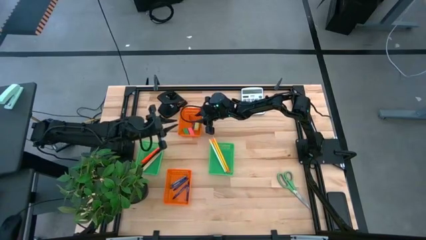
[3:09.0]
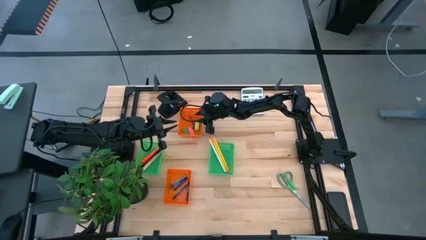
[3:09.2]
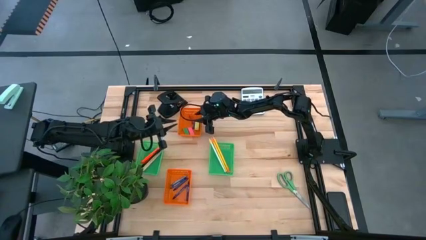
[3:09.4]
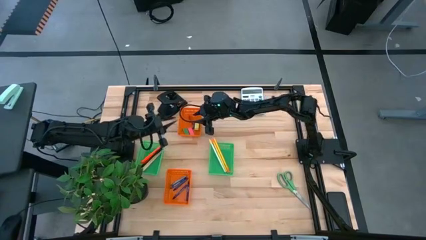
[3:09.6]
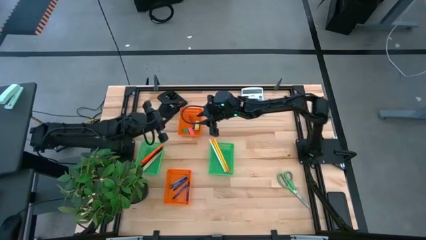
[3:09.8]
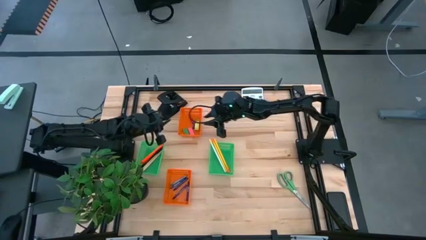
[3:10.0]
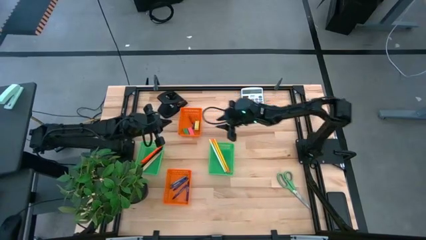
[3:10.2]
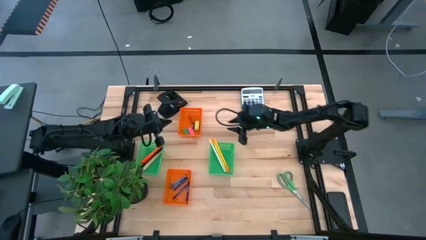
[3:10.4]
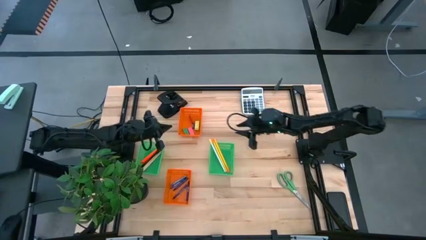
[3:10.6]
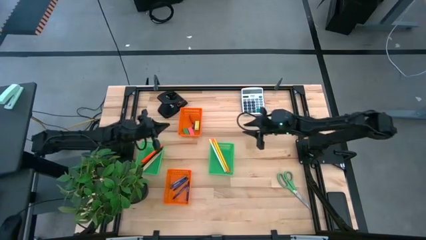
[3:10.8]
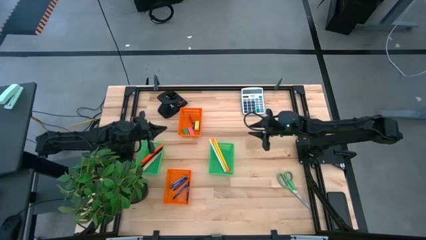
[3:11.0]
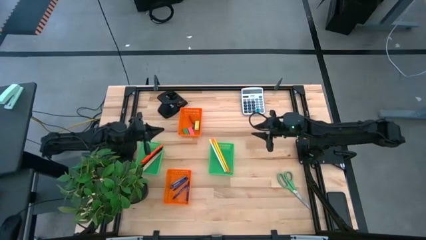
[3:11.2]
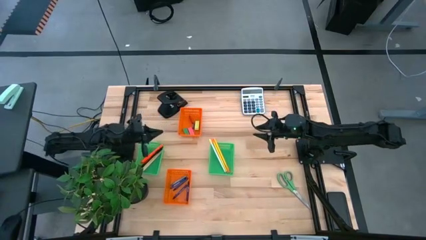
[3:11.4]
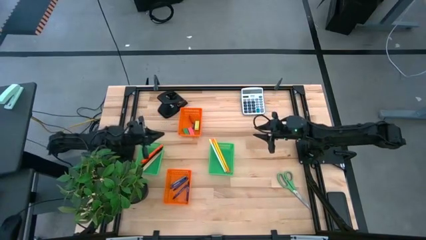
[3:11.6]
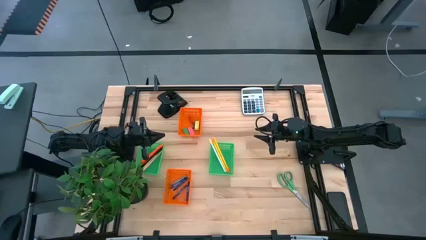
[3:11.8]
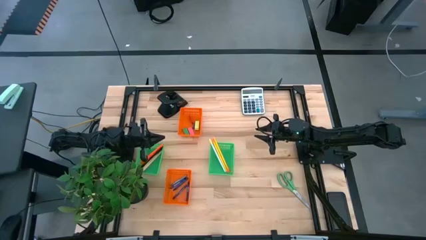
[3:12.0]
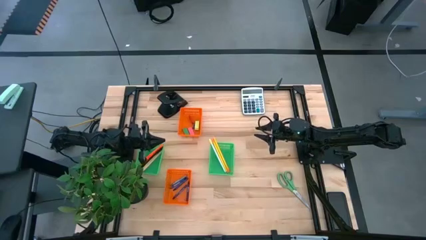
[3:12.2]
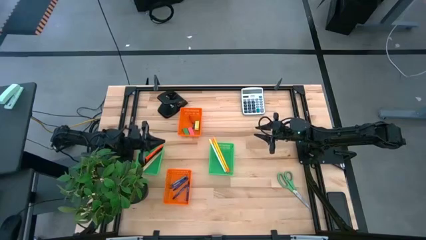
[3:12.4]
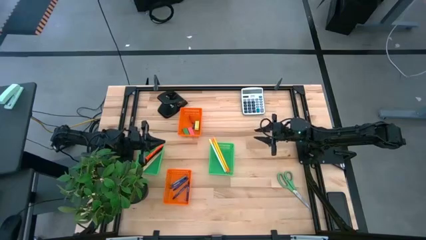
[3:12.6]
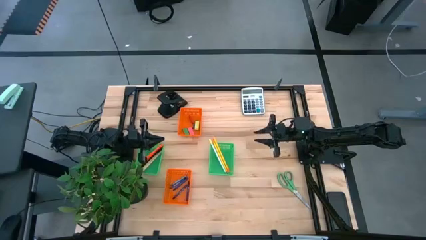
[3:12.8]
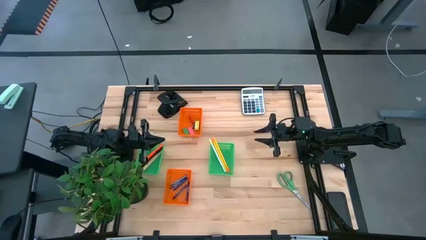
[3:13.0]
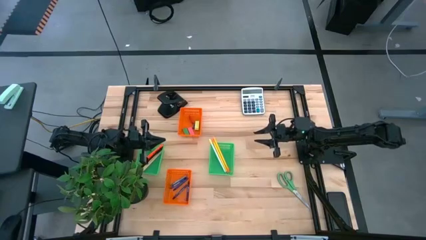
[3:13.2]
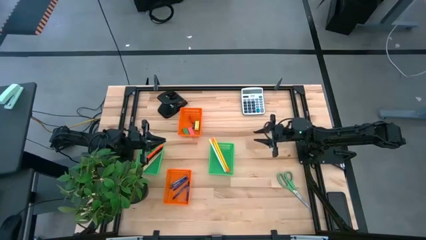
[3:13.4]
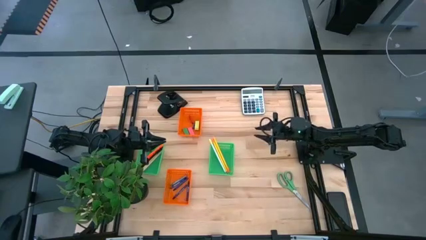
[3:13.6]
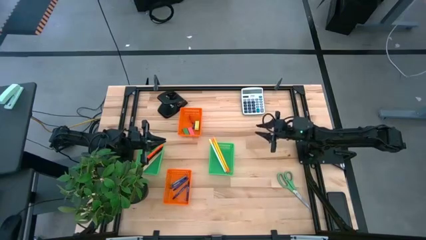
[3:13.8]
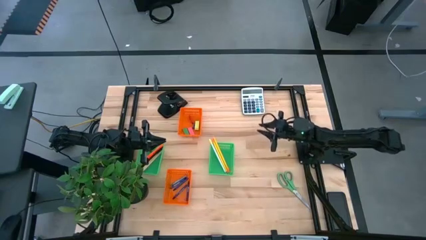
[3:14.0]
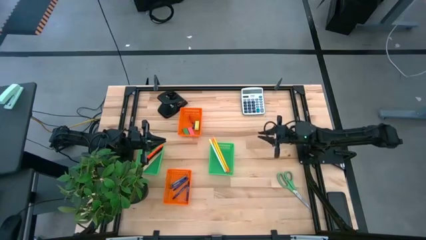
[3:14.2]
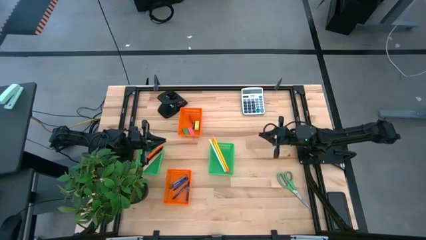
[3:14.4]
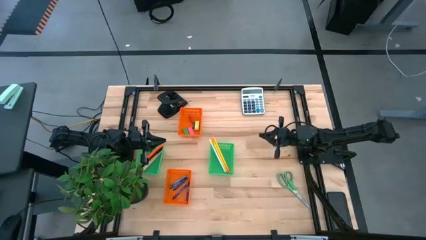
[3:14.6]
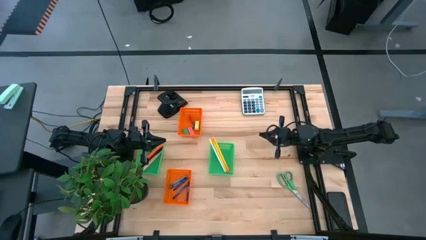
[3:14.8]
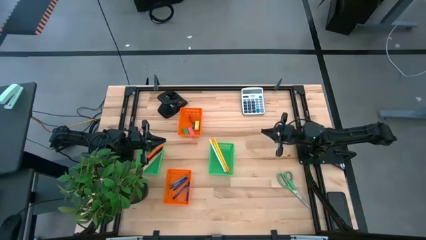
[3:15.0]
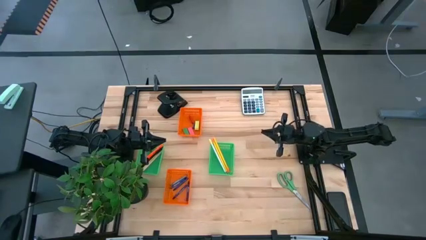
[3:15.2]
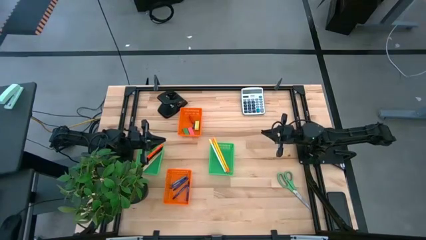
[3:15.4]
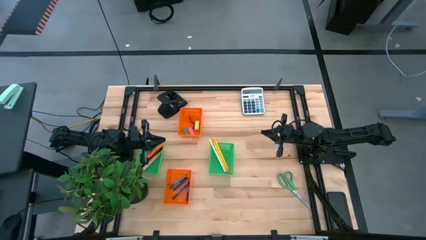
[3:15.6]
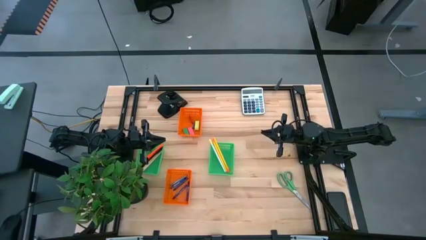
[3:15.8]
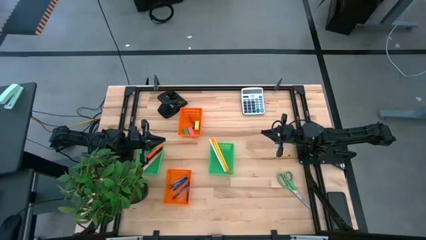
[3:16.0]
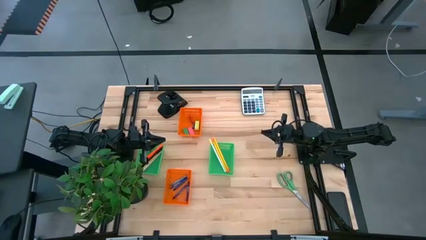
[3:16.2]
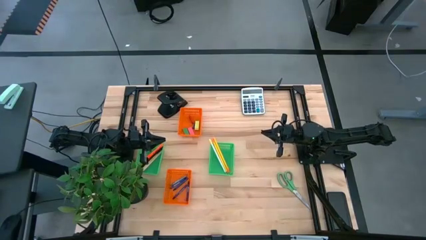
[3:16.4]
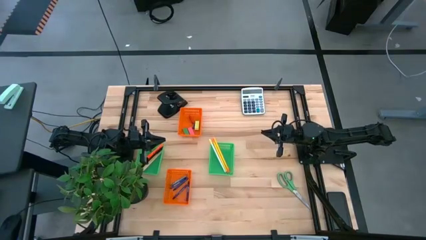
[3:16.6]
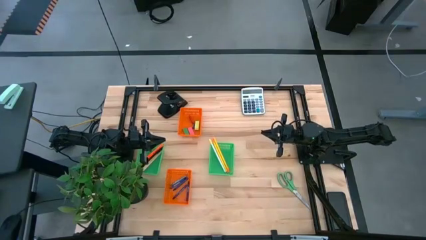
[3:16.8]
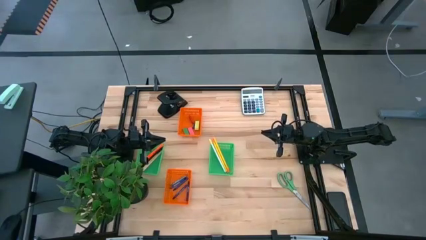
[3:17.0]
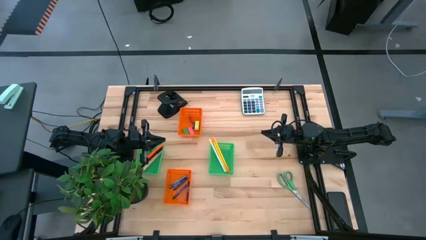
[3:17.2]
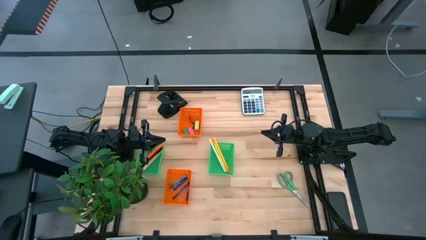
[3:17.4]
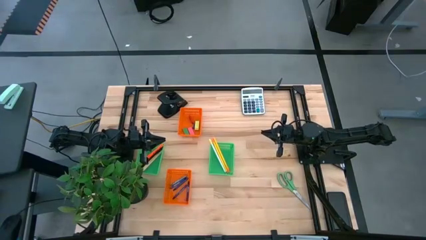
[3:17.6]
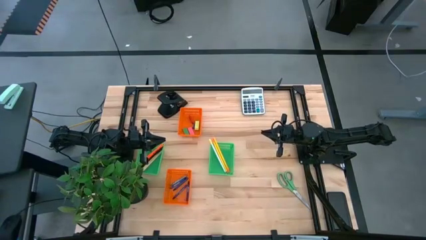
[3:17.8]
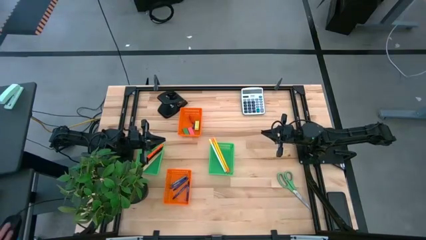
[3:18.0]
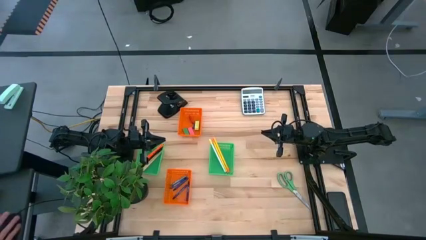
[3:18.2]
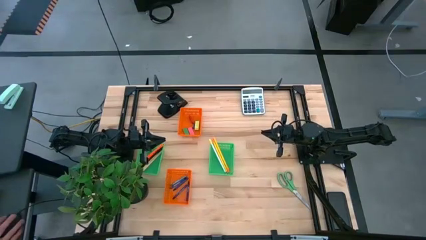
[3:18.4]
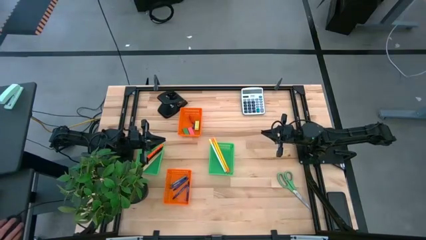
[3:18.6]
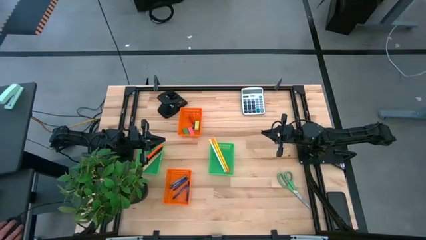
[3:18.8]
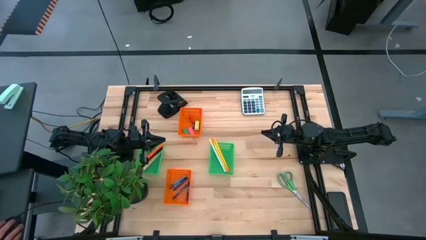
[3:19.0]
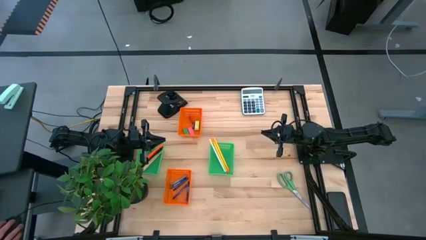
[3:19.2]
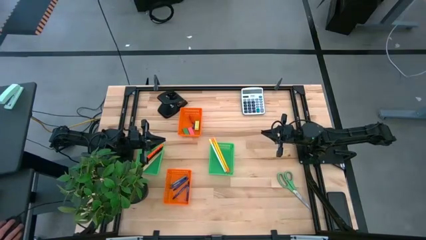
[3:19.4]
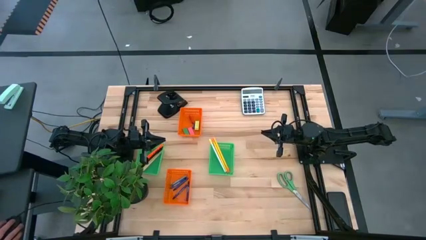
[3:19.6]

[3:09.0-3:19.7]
Task: Sort crayons/erasers/pens/pencils in bins
Return to Home Position

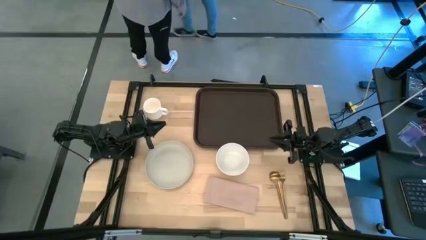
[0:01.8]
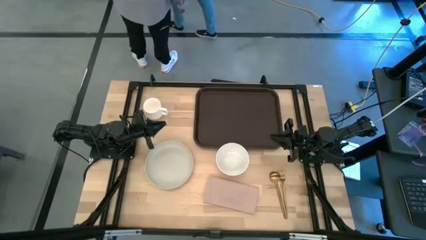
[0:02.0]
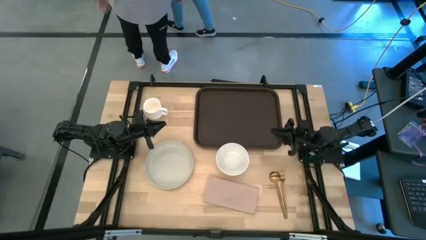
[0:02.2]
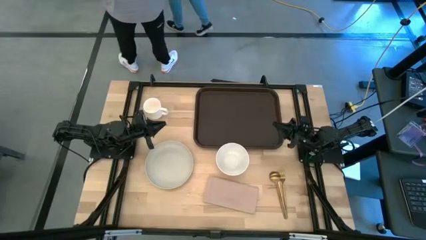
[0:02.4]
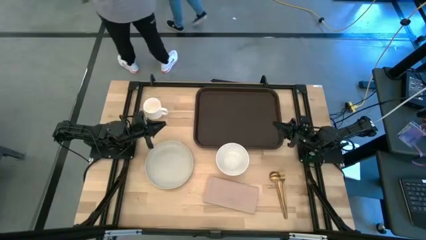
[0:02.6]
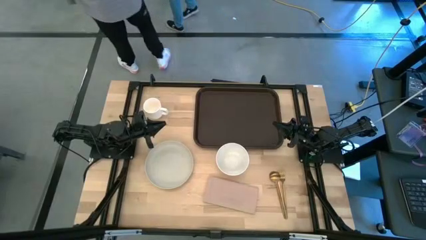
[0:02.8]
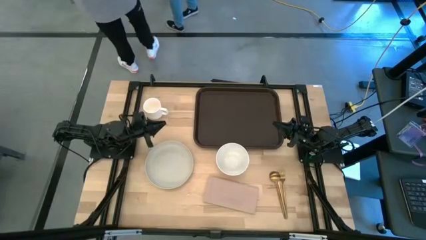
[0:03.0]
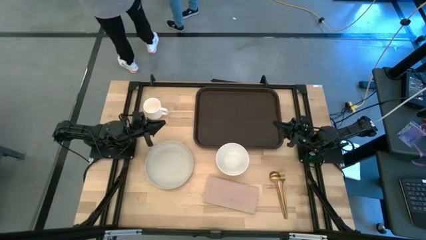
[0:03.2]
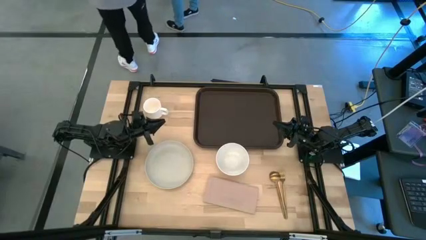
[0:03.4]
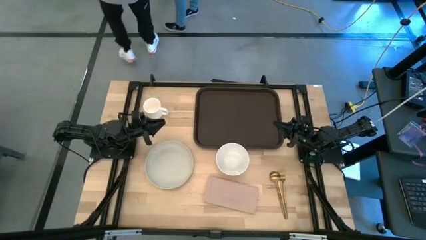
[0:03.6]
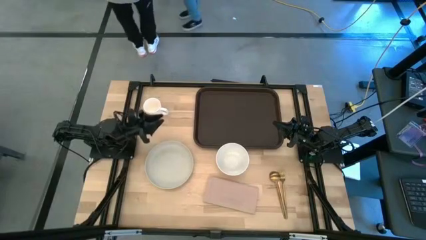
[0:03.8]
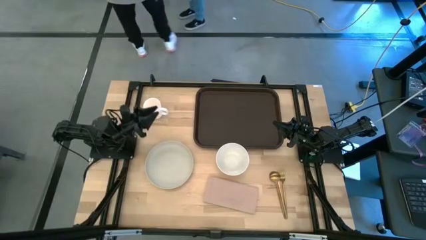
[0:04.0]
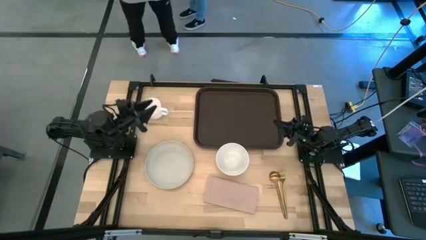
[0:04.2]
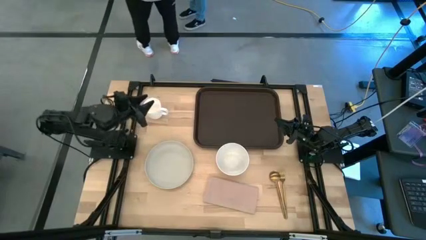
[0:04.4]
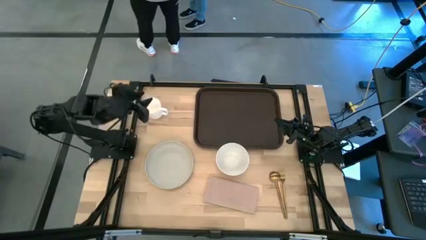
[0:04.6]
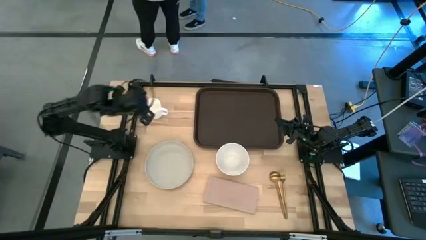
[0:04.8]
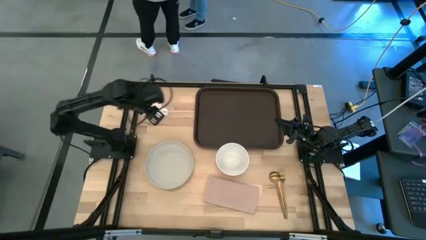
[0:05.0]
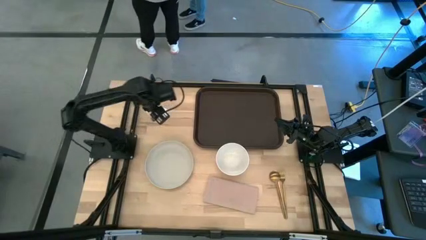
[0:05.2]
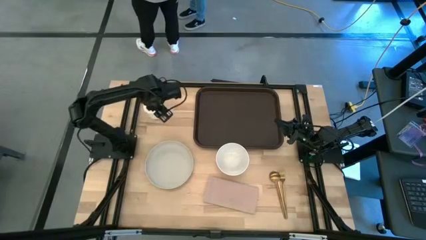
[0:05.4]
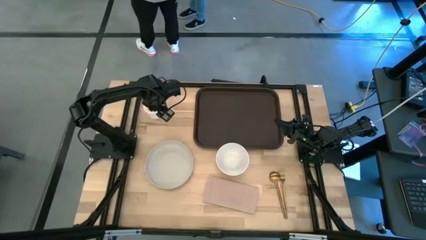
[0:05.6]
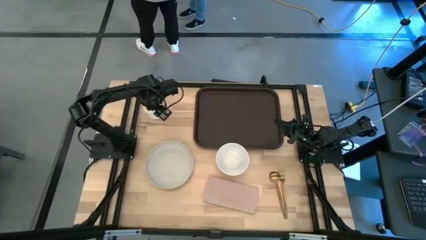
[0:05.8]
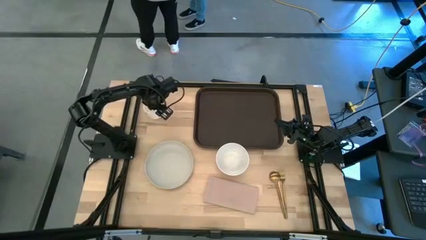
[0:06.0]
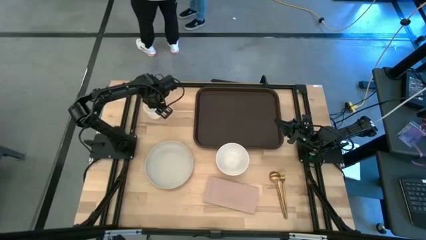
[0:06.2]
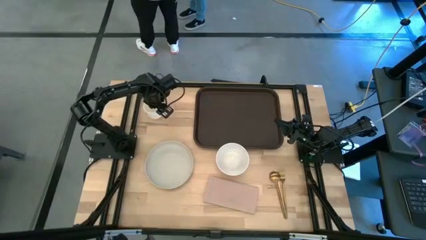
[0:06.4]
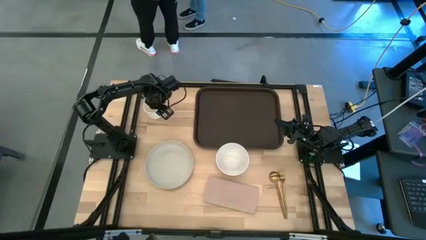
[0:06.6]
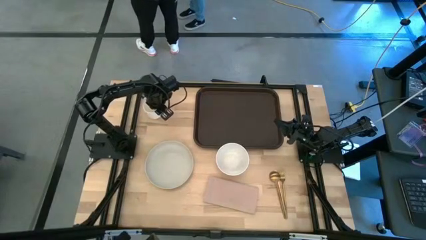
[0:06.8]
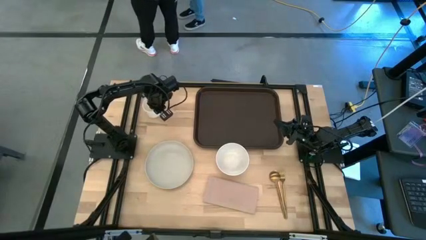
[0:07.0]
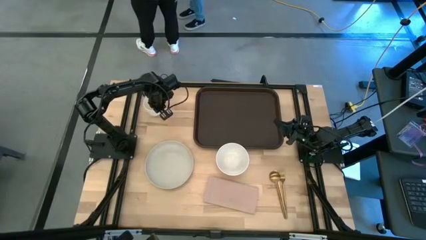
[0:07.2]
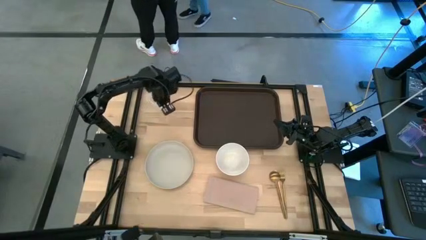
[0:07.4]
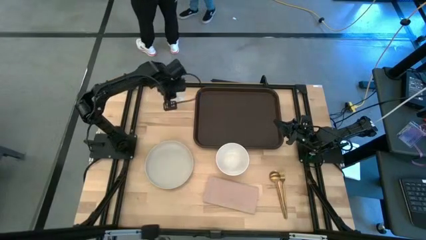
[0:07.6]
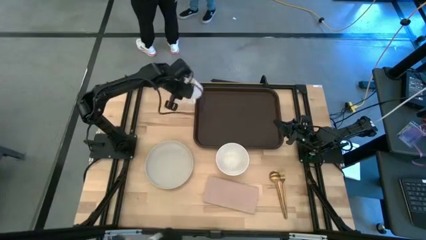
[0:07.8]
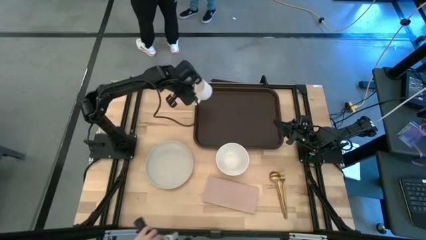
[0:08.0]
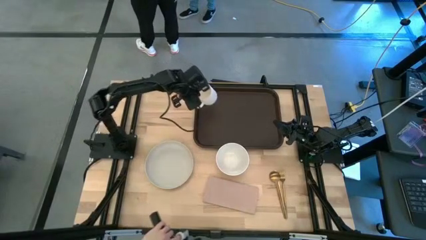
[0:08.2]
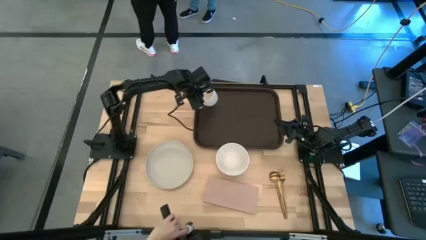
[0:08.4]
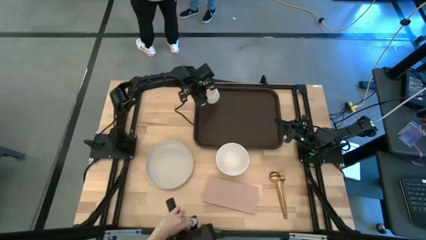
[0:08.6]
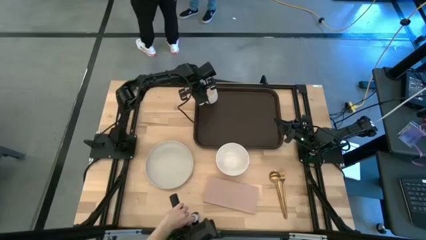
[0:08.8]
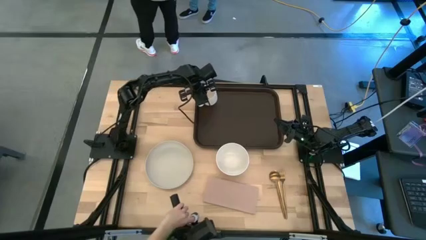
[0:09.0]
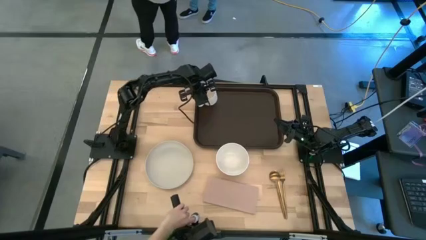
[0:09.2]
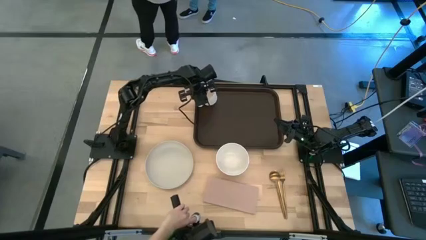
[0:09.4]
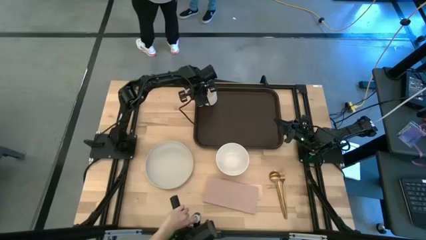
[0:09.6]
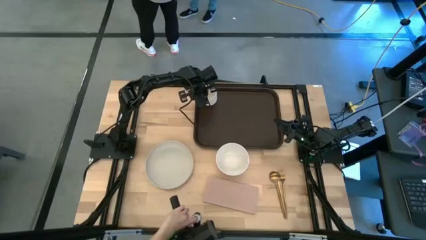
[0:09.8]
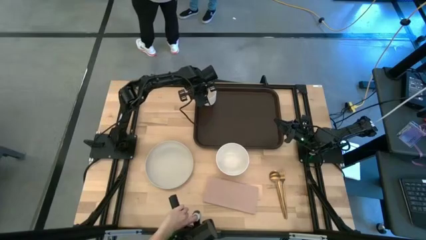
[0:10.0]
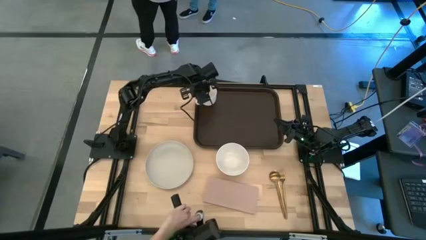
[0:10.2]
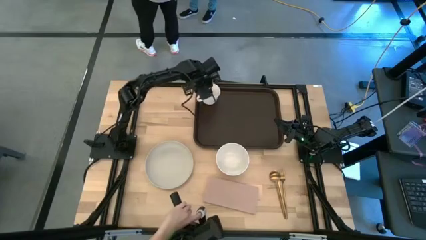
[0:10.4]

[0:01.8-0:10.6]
Task: Set up tray
Put the white mug on the black serving tray
